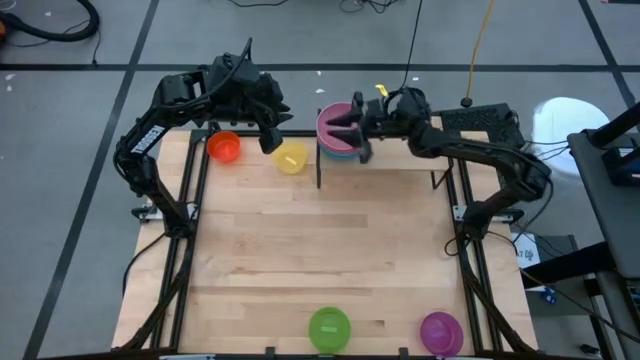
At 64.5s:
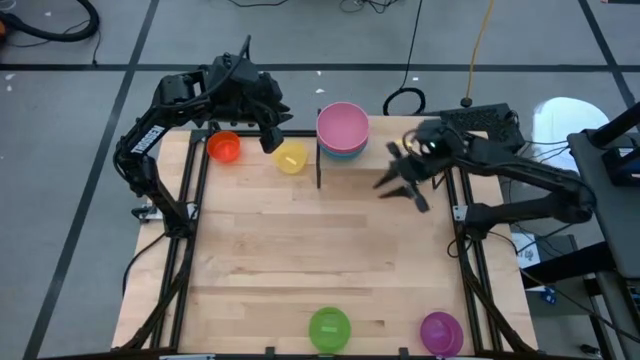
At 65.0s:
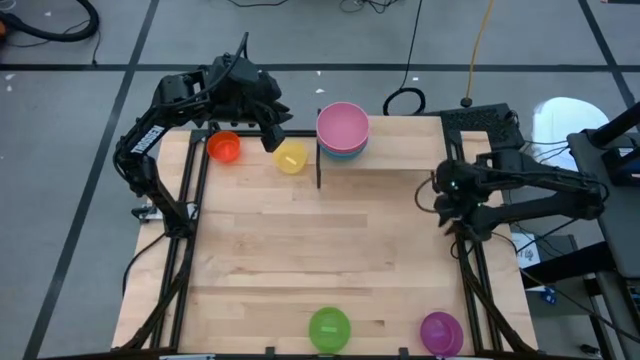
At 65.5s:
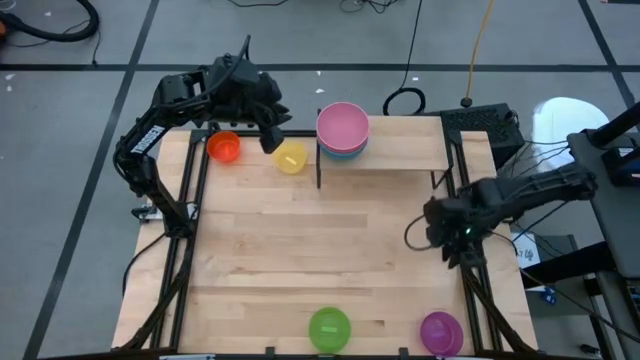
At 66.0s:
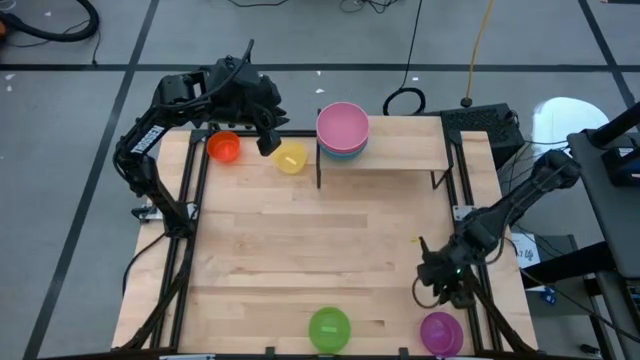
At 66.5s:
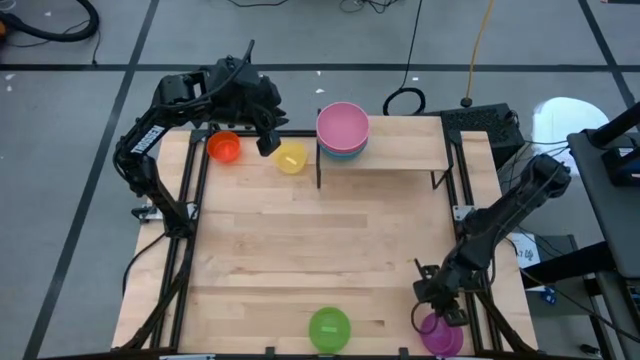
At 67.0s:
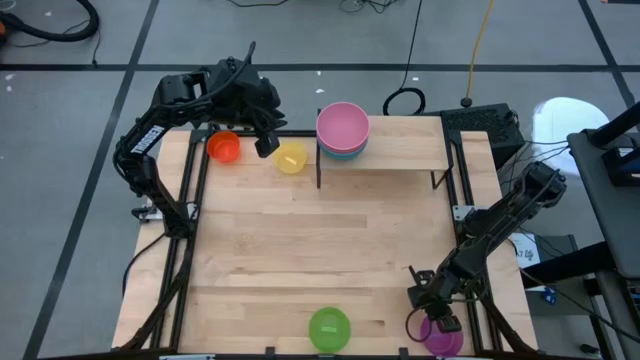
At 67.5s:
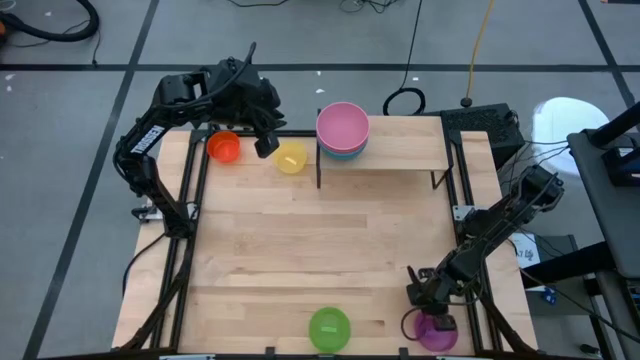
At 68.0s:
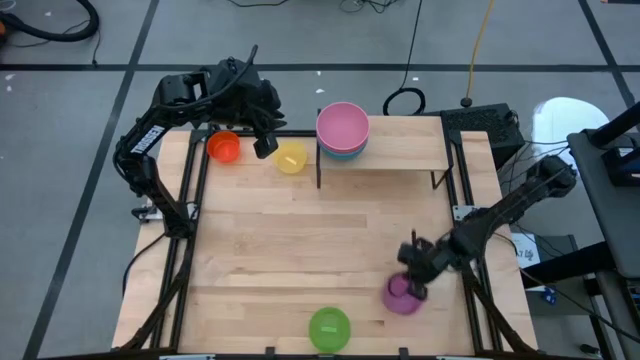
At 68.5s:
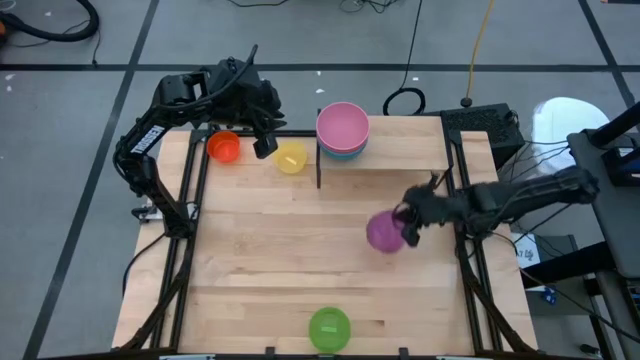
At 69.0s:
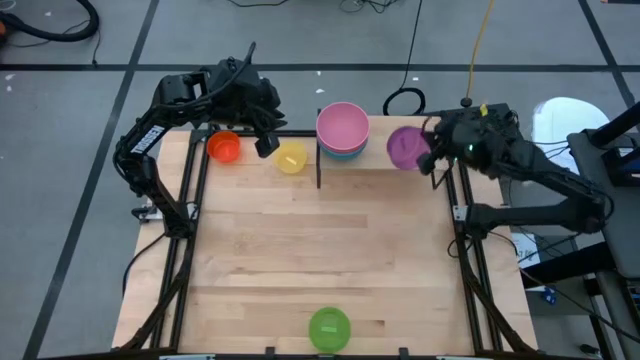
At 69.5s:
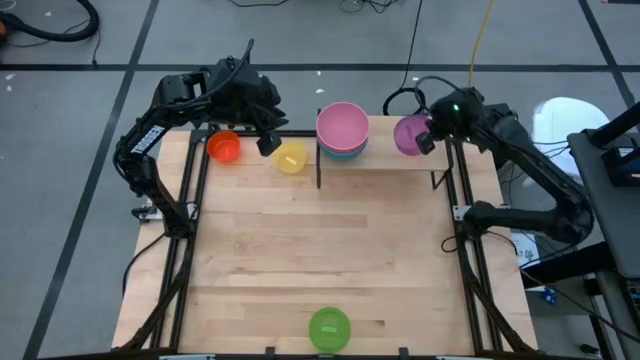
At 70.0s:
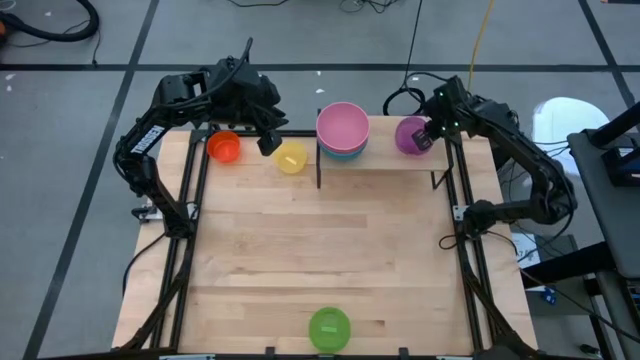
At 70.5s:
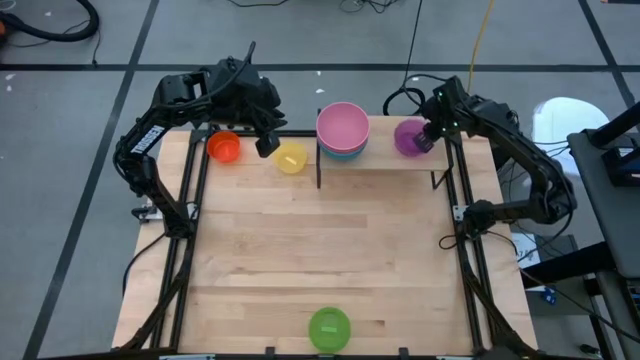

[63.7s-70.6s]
Task: Place and stack bowls onto a shelf
Put the purple bowl on the shelf

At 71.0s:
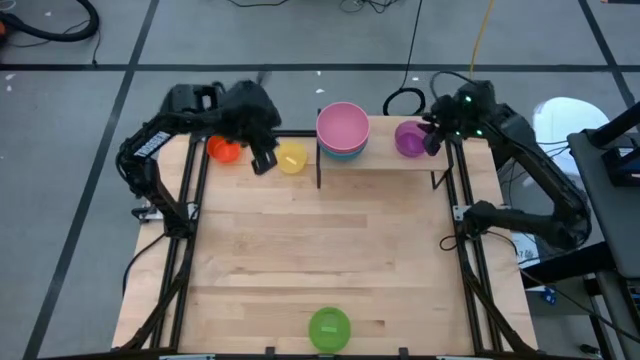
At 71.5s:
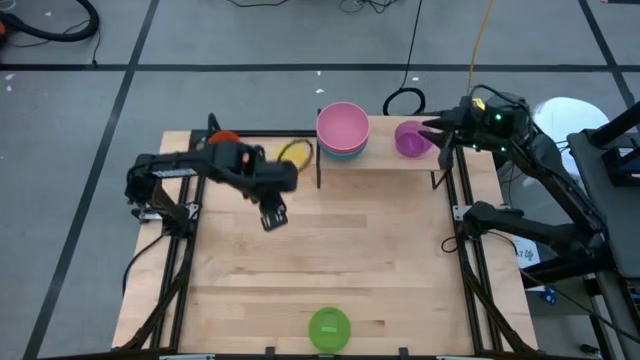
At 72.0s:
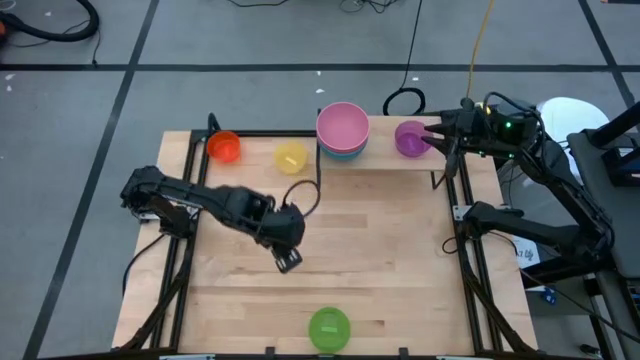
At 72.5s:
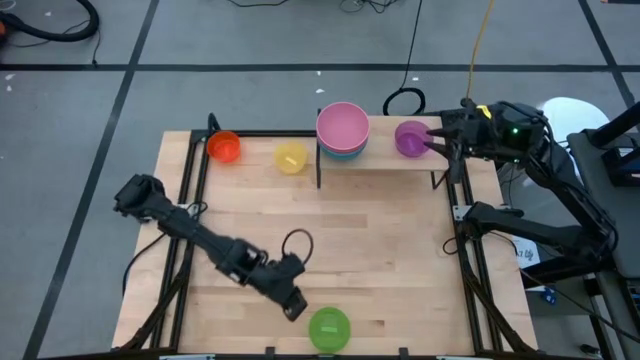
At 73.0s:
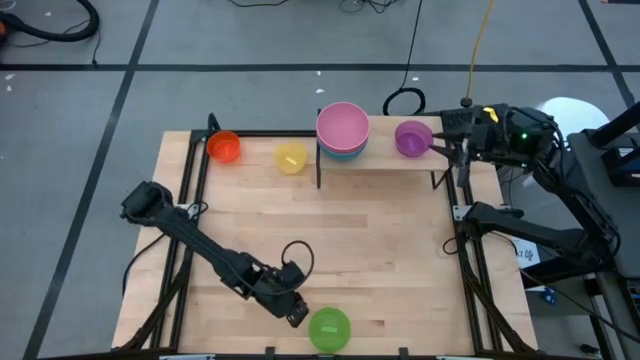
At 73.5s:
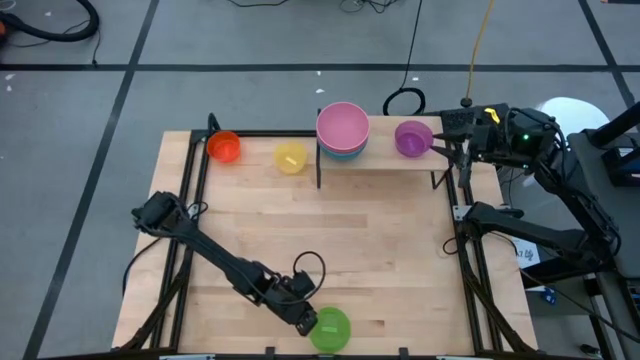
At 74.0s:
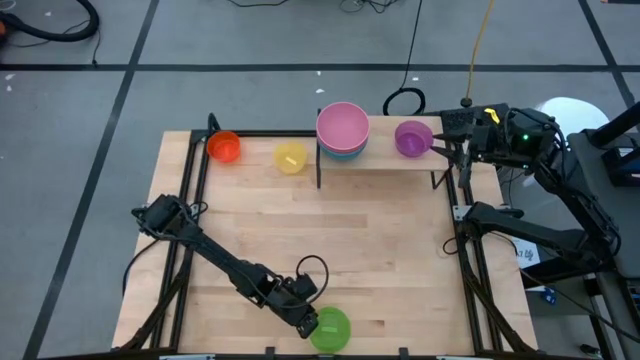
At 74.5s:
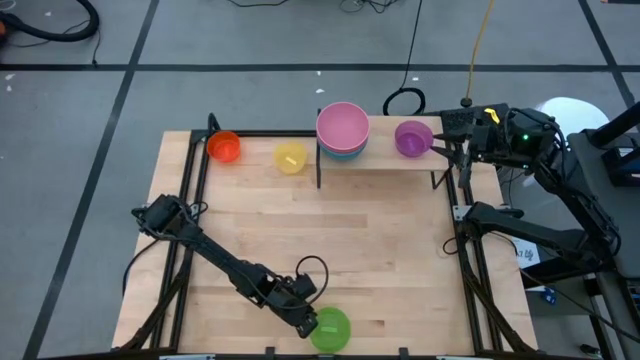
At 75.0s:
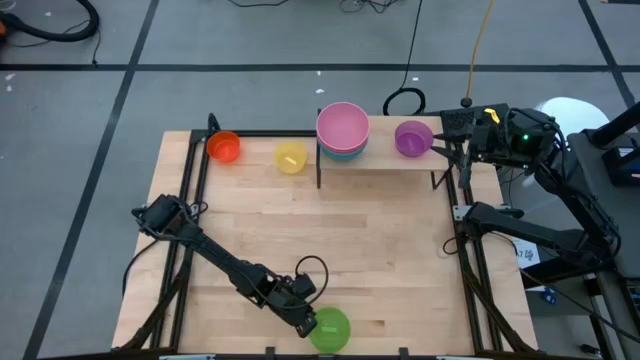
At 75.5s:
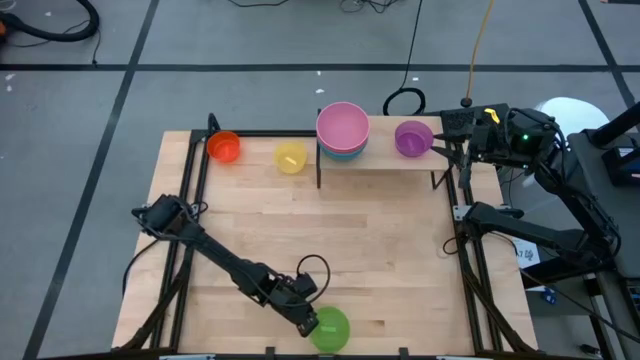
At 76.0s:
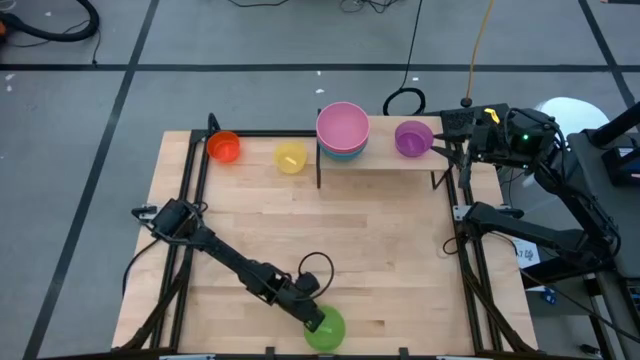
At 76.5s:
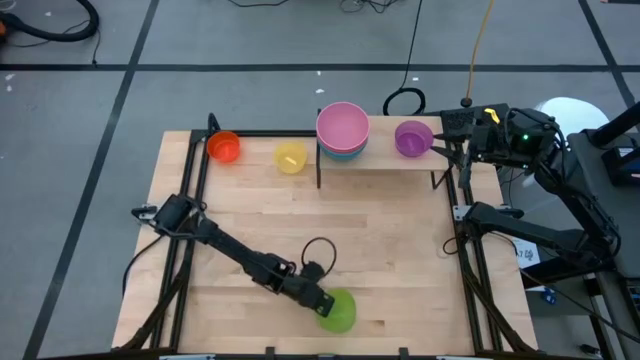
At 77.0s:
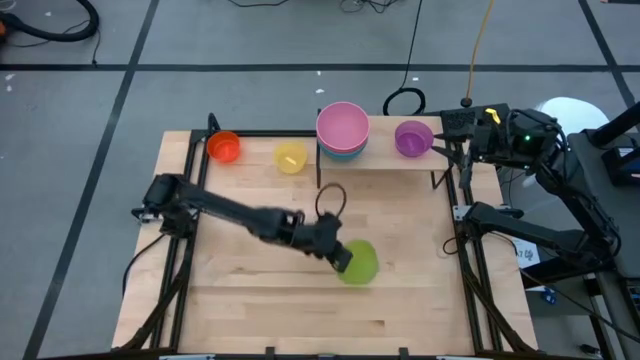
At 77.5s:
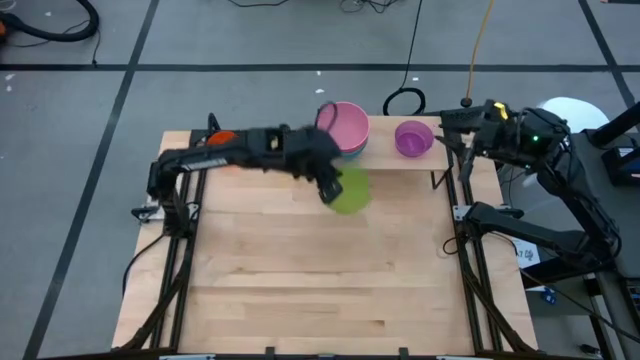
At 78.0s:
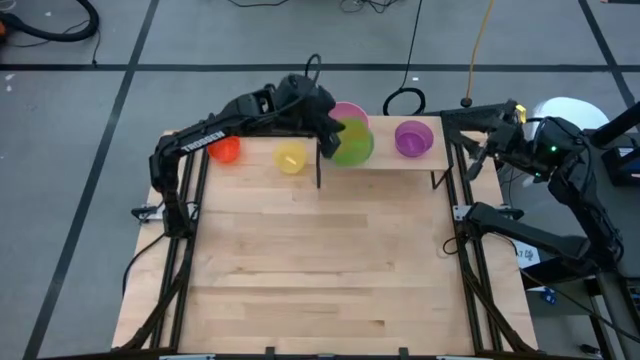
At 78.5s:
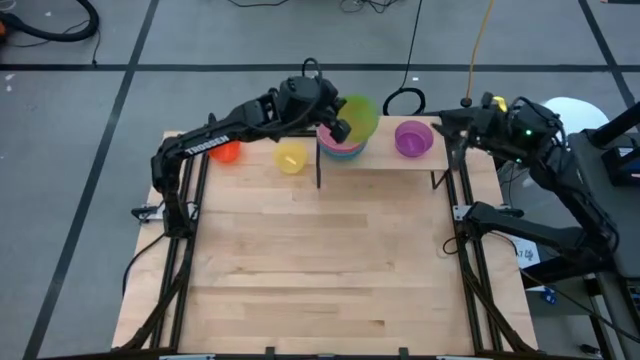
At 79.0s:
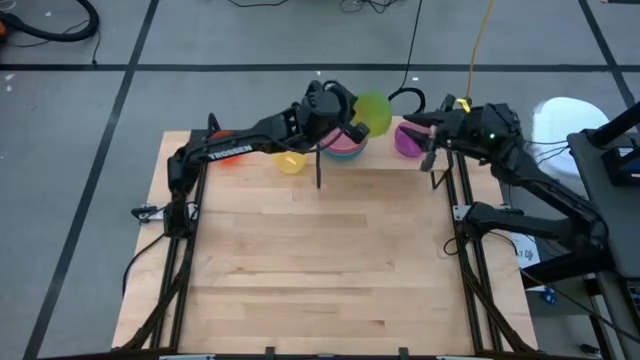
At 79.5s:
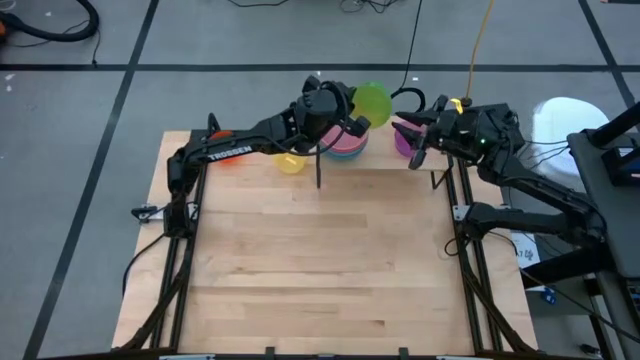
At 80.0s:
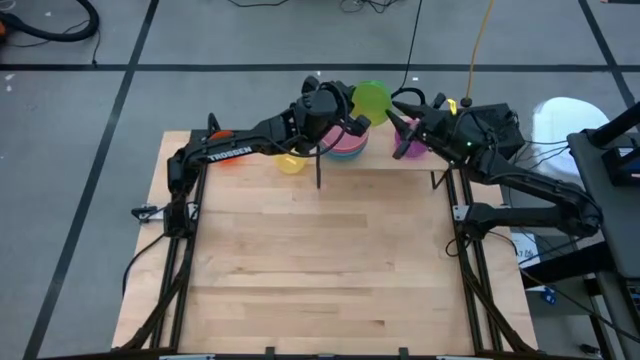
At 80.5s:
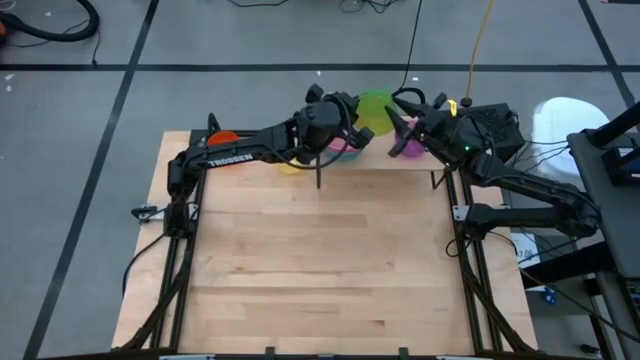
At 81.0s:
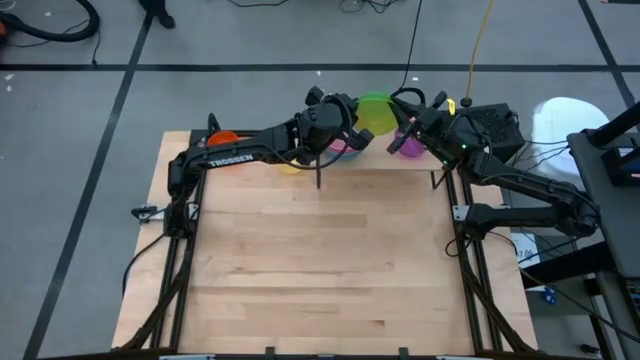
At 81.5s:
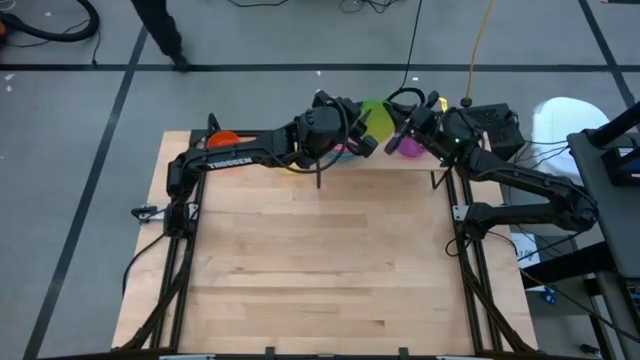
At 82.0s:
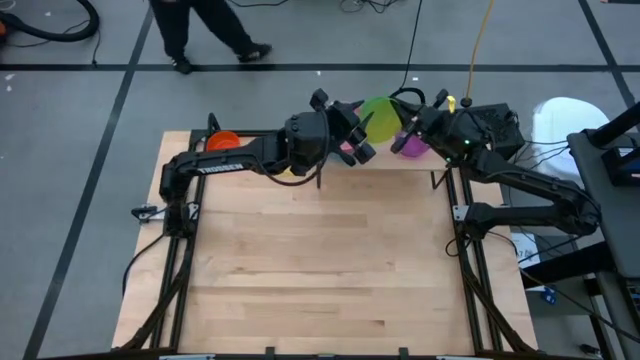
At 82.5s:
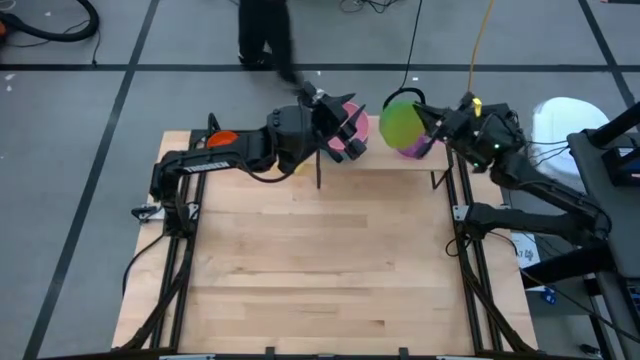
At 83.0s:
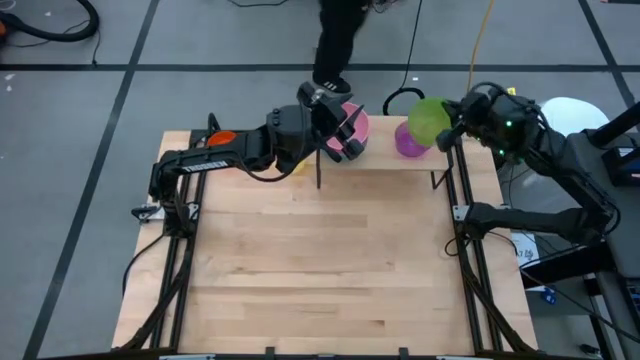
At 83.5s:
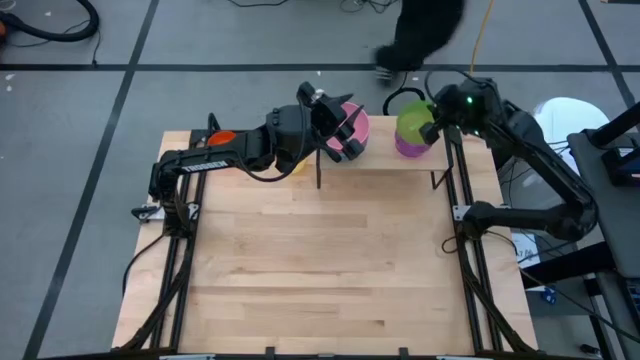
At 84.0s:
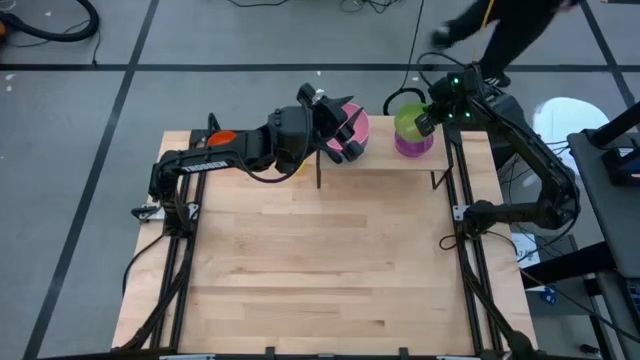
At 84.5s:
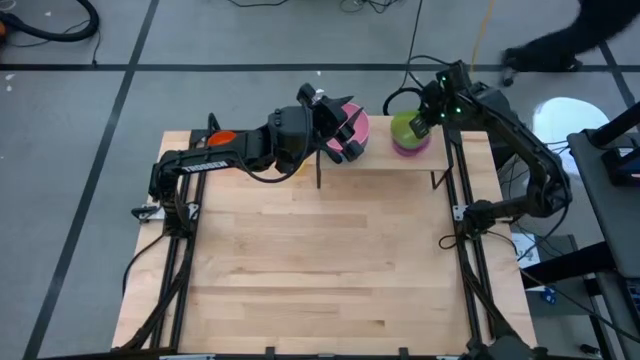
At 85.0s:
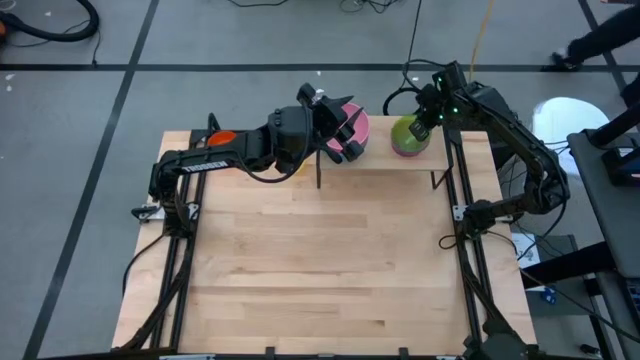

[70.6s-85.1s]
Stack the green bowl on top of the purple bowl on the shelf

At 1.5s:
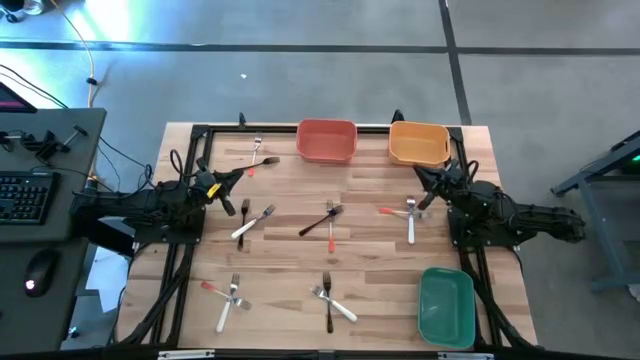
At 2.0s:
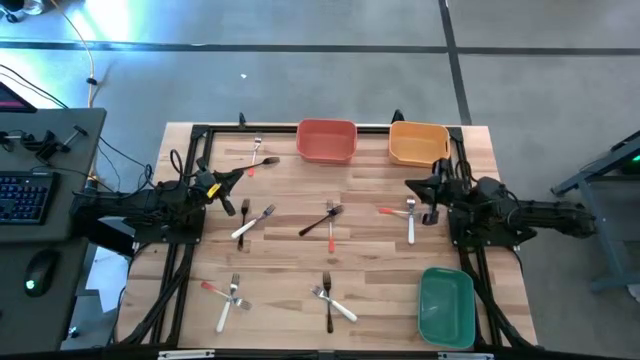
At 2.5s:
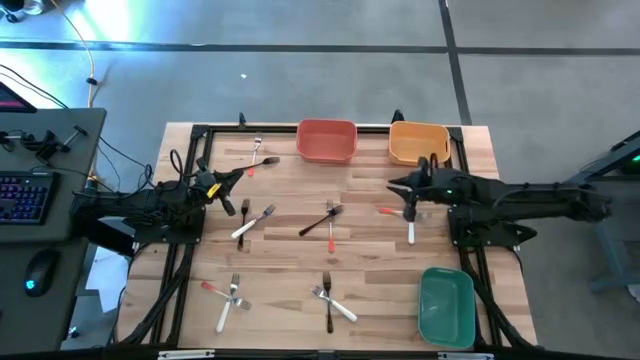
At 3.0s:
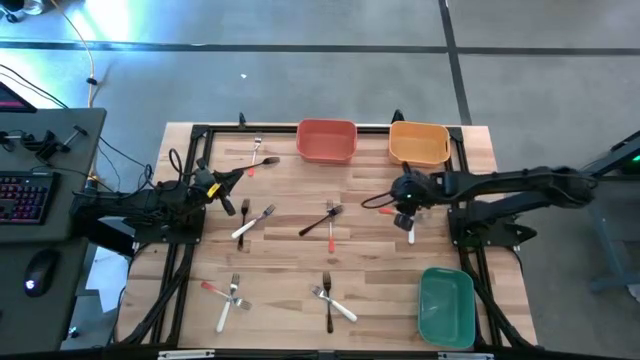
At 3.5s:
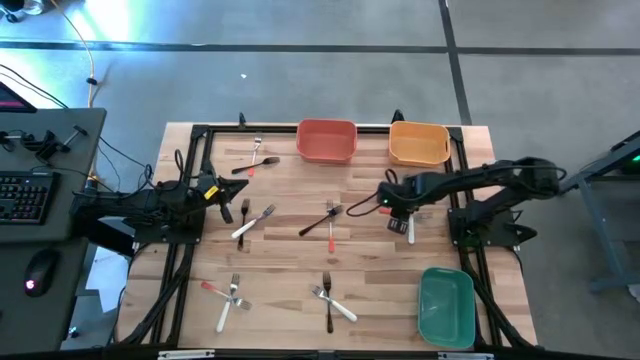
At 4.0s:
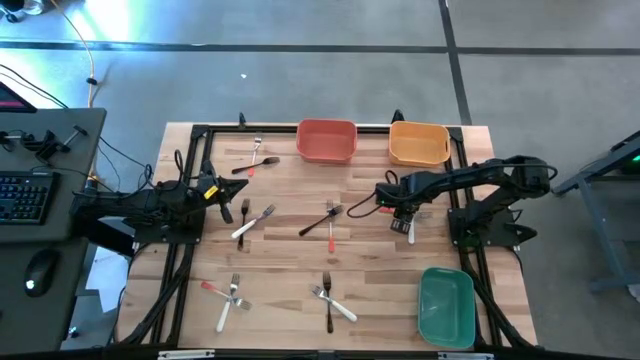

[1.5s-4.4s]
Task: Sort silverware by color (type)
Put the orange fork into the green bin
